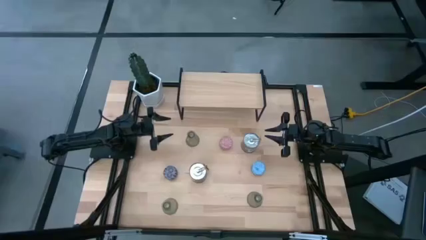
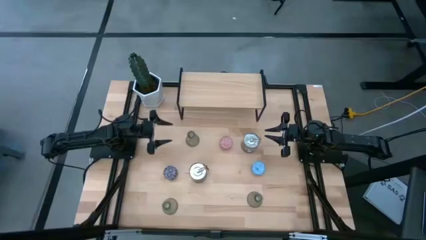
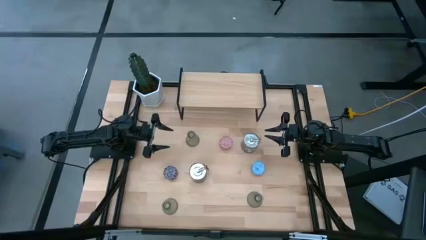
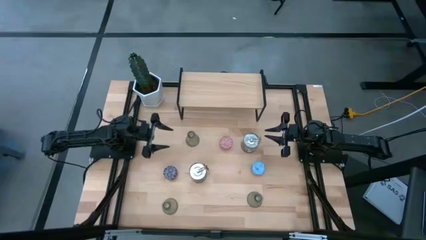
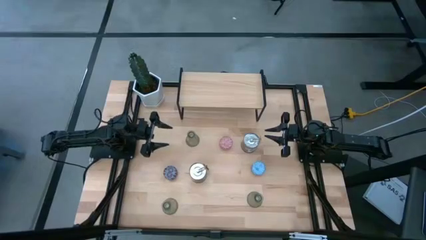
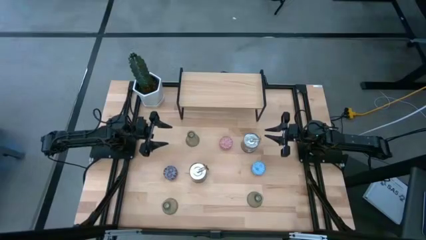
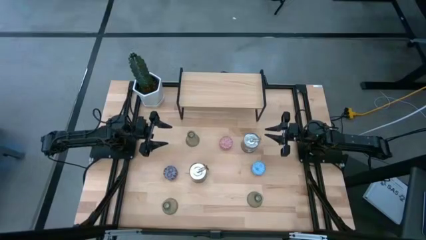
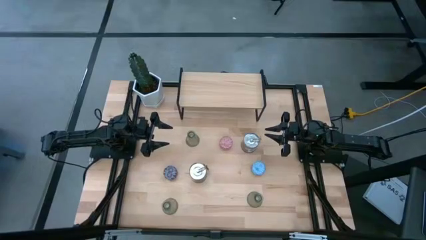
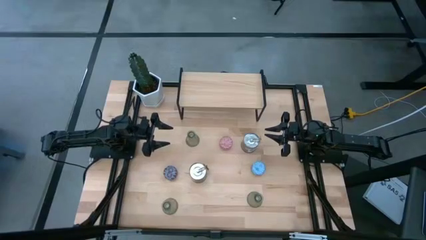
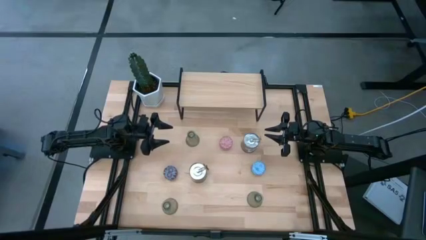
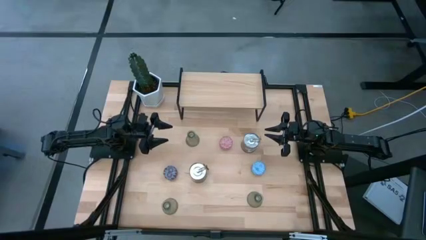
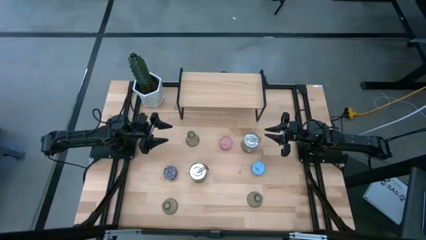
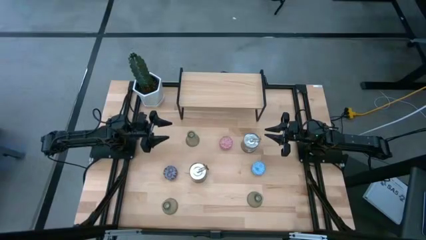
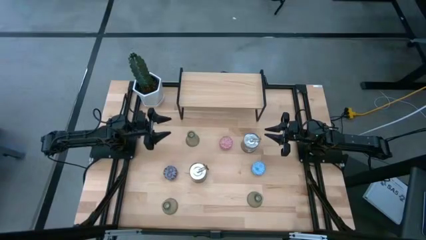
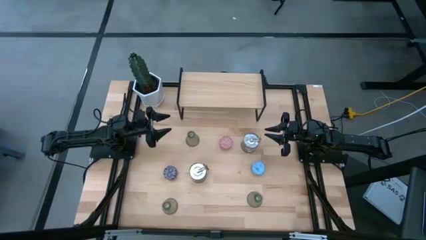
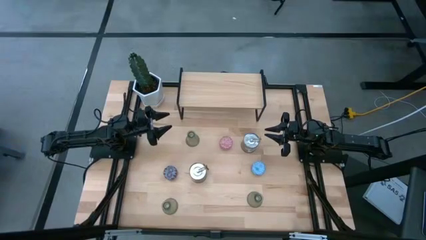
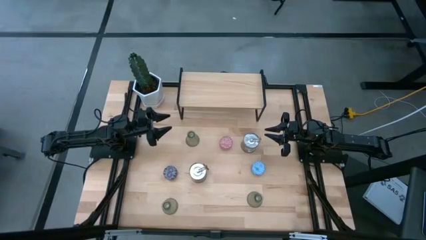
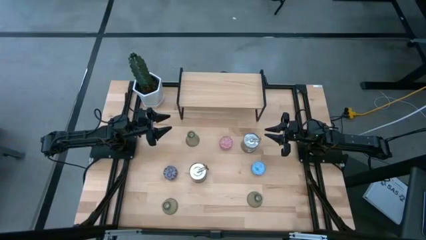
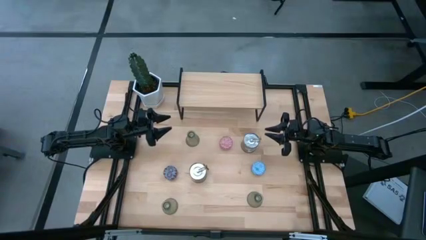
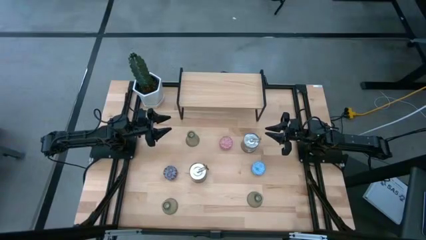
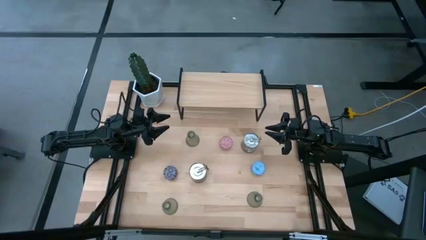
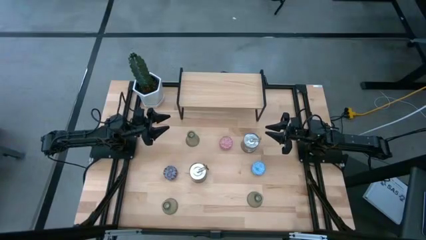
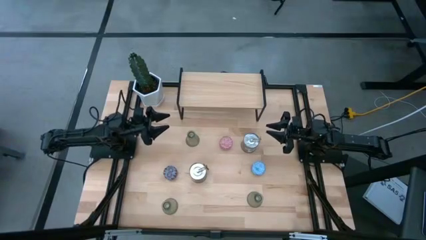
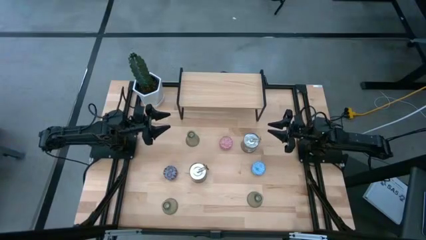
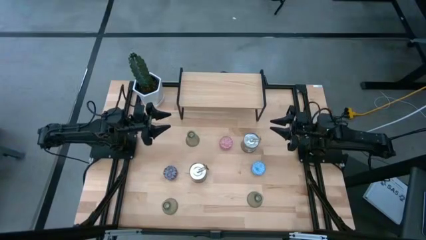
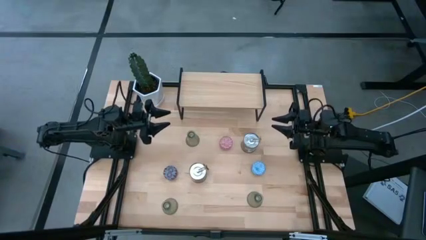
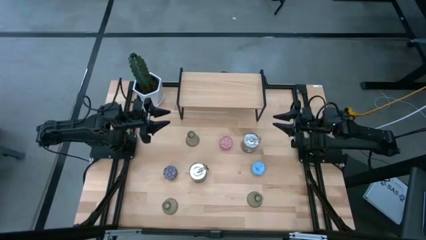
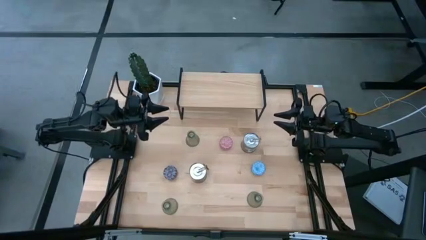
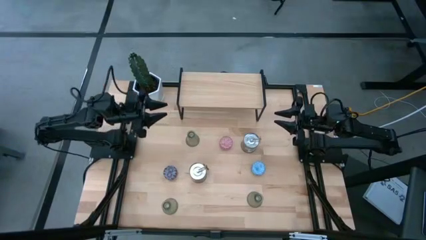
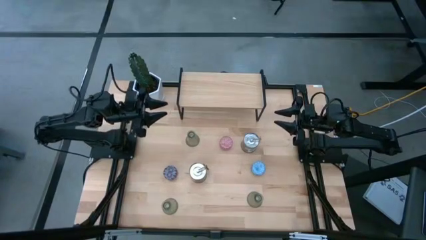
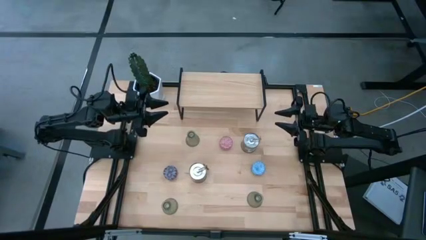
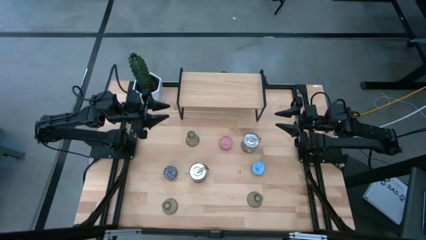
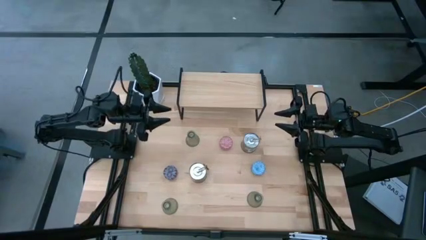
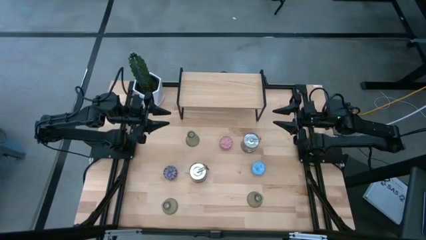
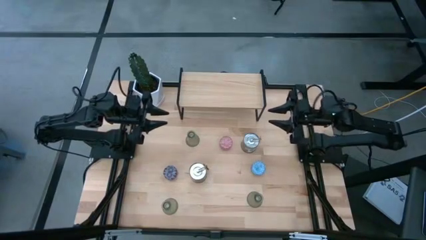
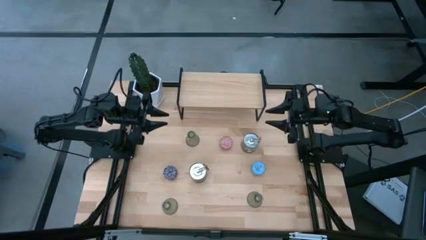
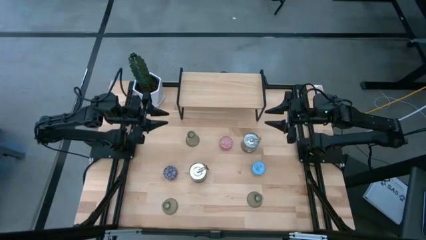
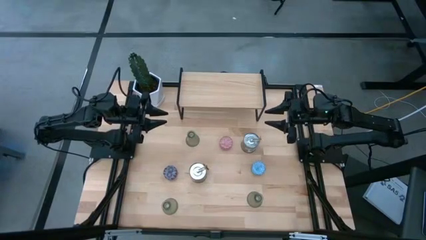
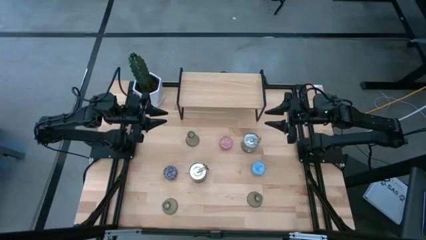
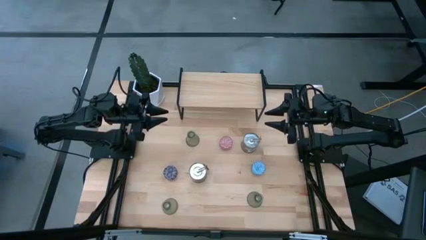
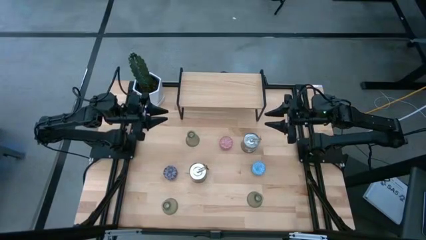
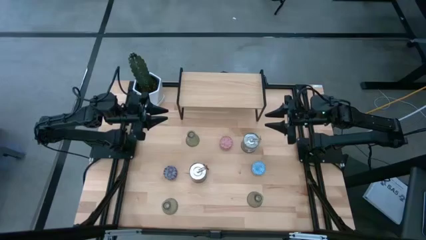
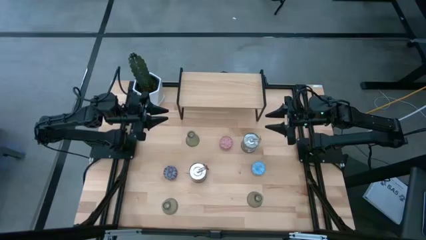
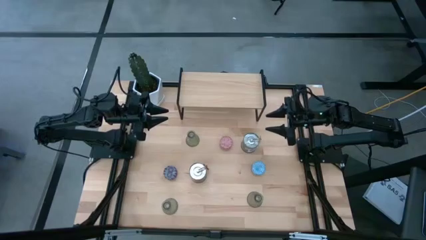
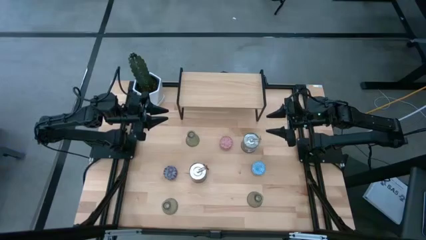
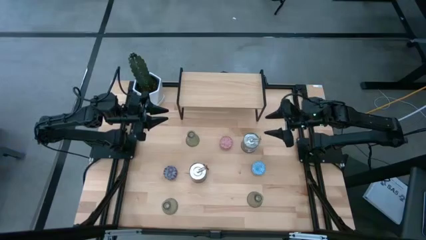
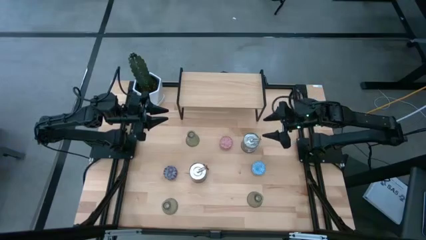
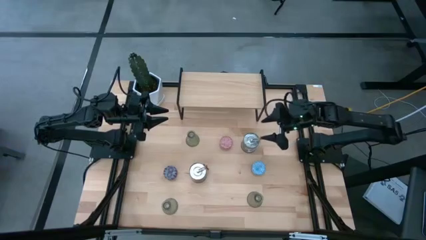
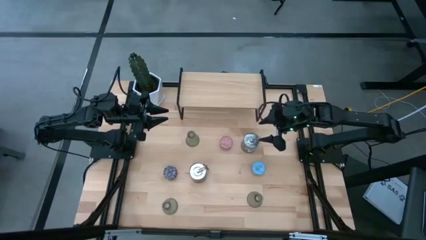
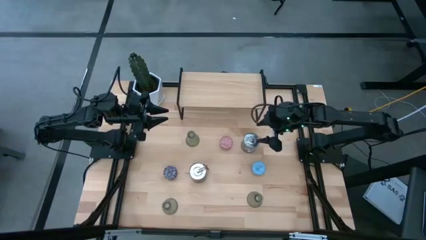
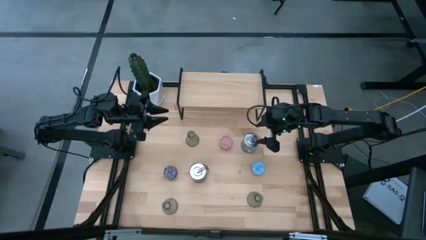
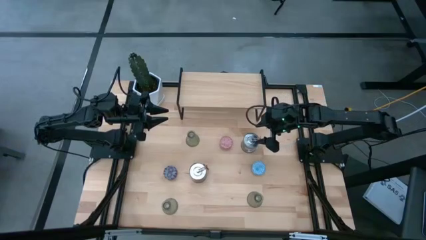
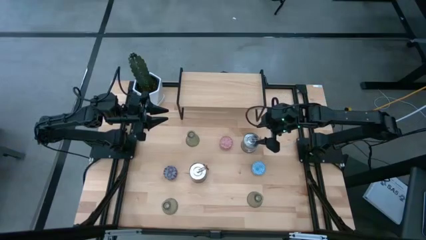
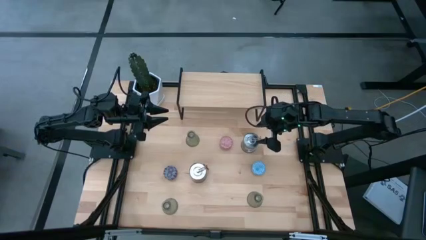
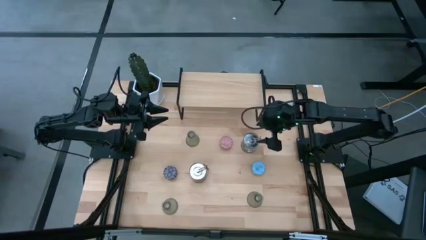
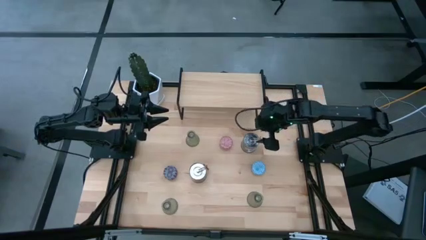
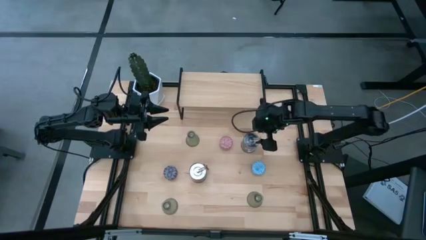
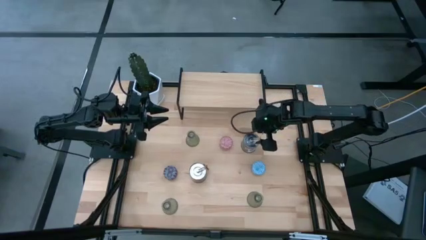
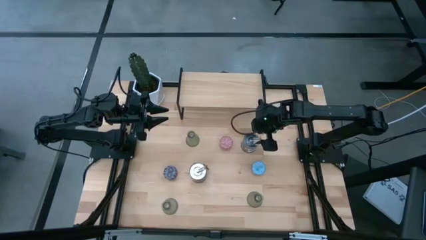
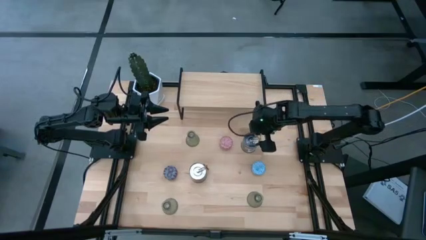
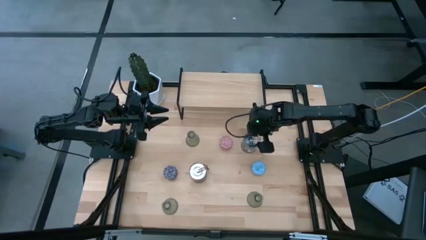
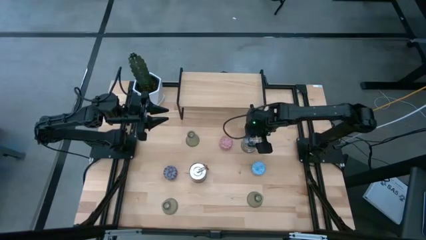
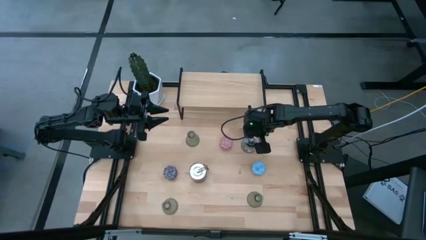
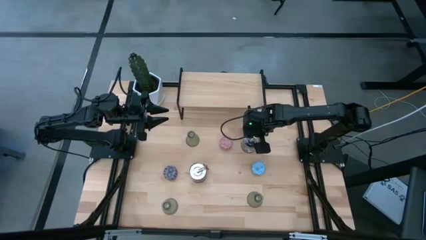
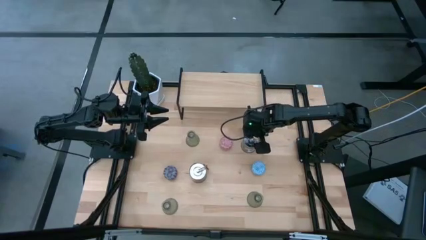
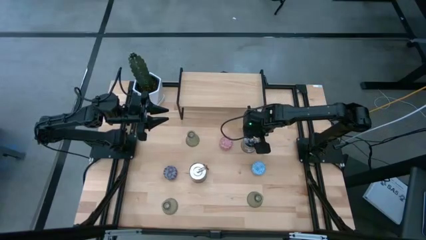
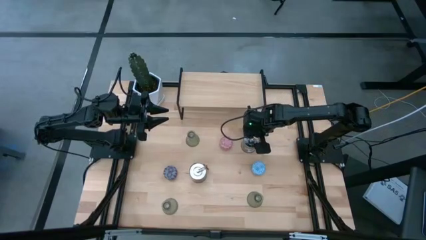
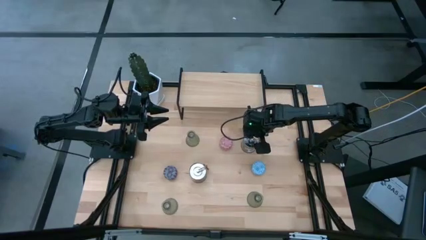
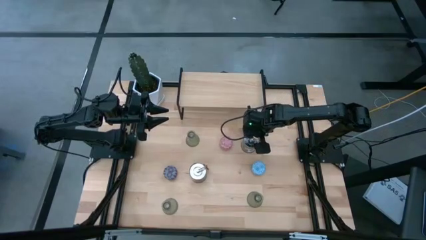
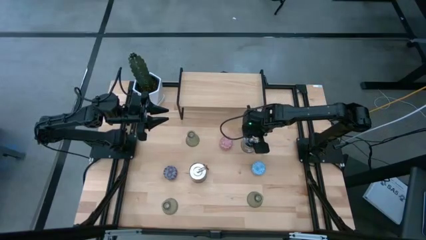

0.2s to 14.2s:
Task: Pick & Place candle stick holders
Put the top right silver scented candle on the shelf
